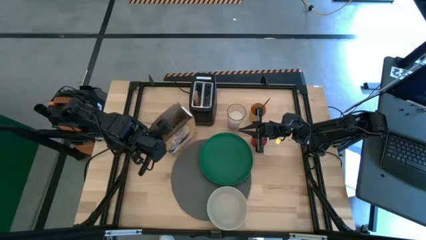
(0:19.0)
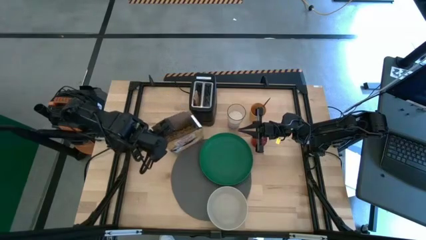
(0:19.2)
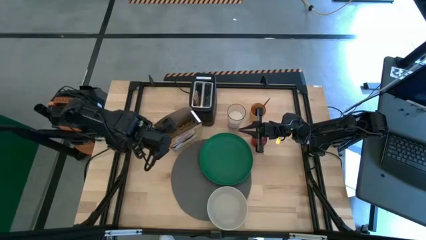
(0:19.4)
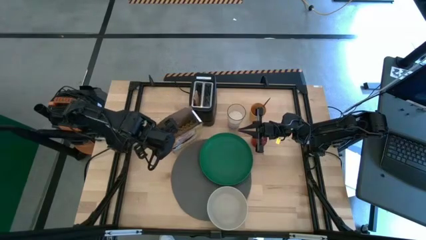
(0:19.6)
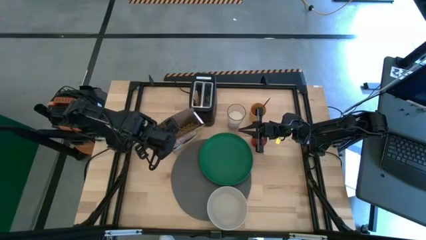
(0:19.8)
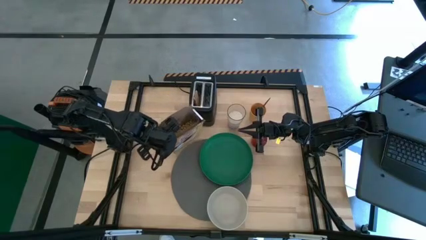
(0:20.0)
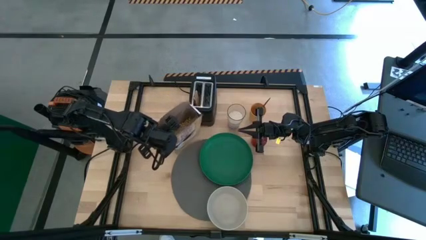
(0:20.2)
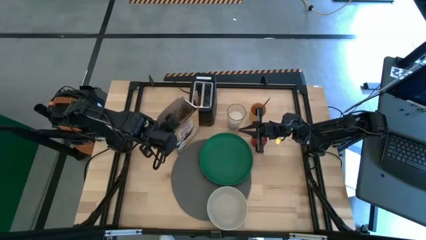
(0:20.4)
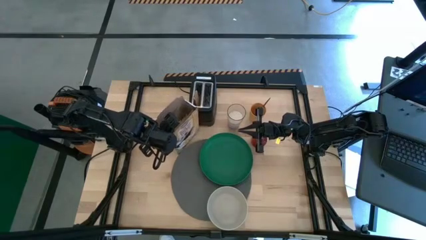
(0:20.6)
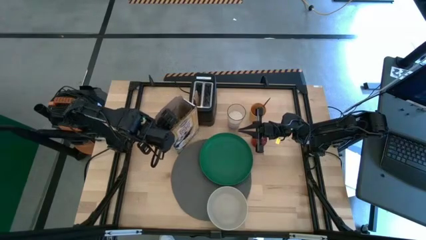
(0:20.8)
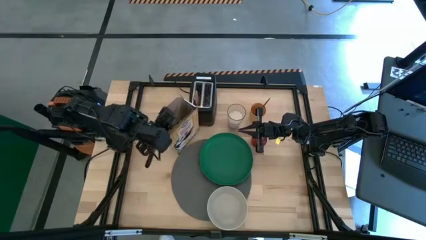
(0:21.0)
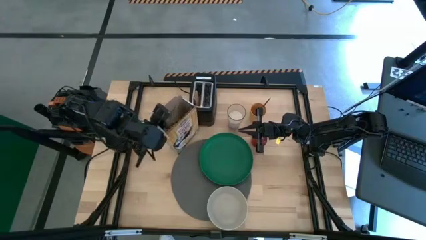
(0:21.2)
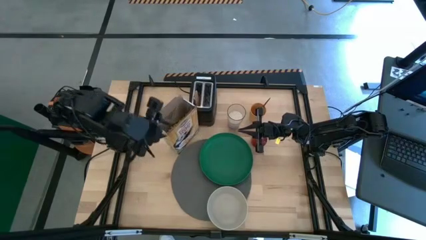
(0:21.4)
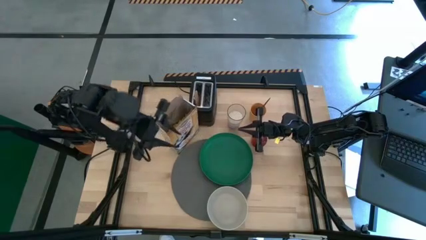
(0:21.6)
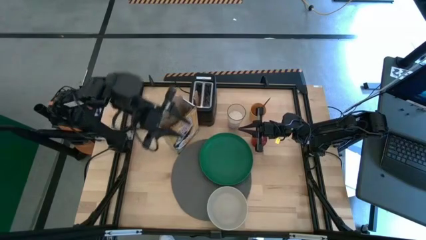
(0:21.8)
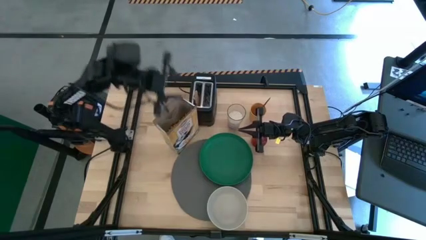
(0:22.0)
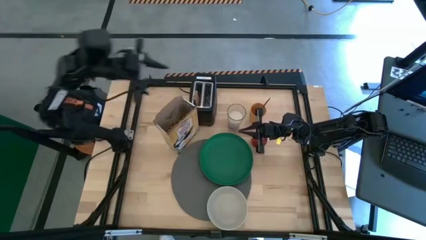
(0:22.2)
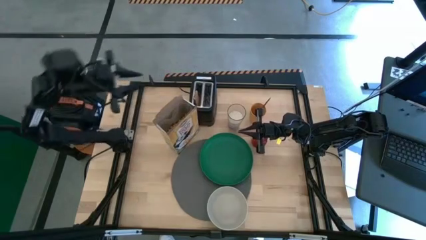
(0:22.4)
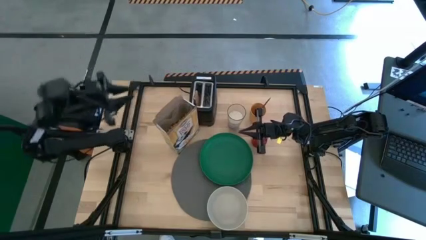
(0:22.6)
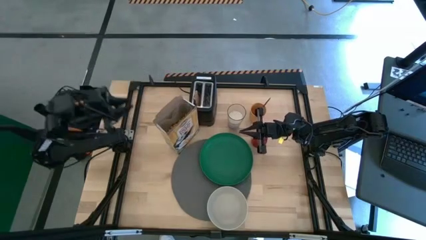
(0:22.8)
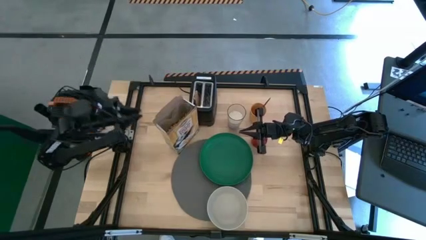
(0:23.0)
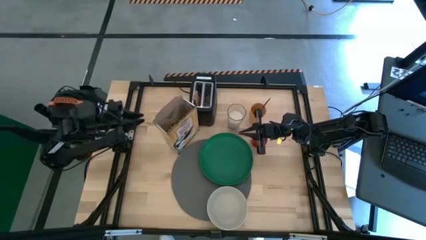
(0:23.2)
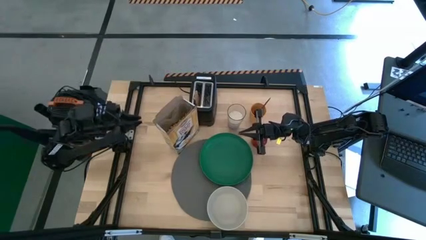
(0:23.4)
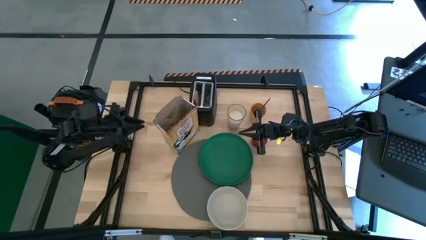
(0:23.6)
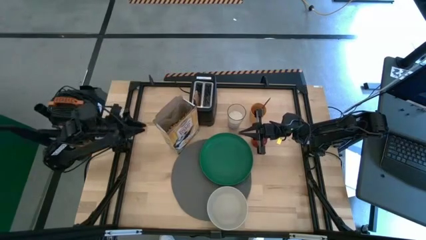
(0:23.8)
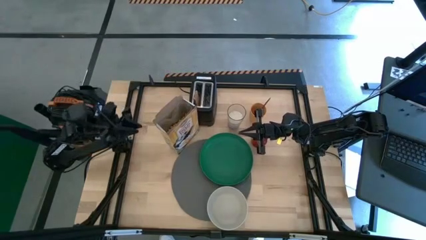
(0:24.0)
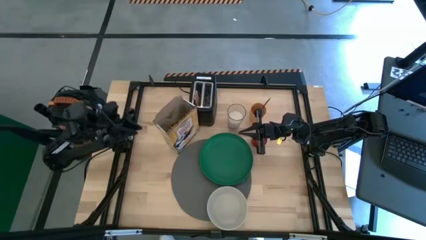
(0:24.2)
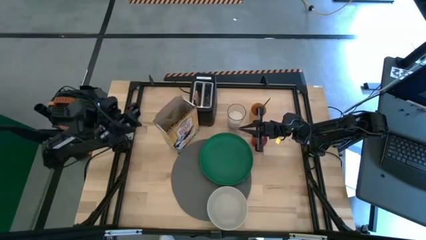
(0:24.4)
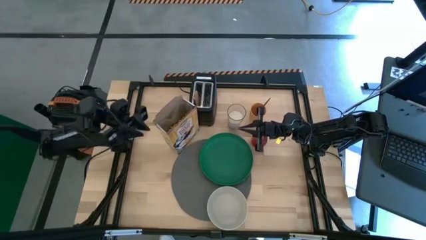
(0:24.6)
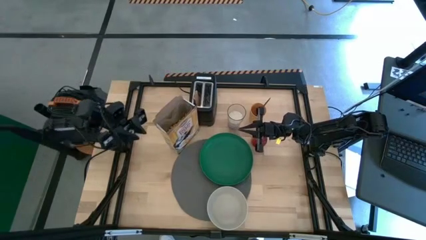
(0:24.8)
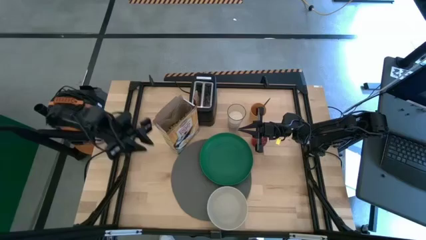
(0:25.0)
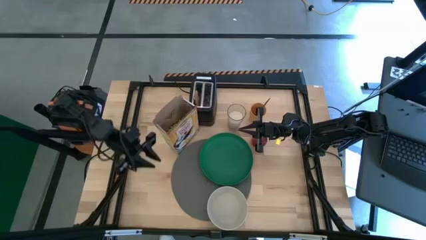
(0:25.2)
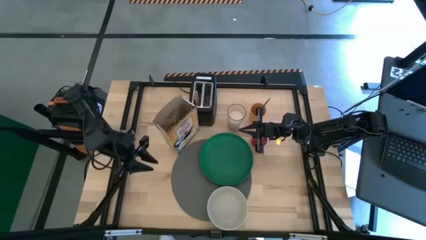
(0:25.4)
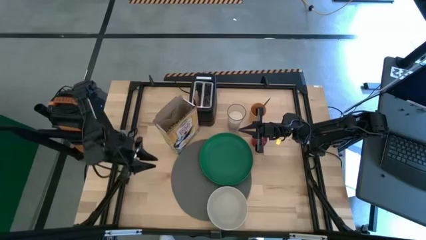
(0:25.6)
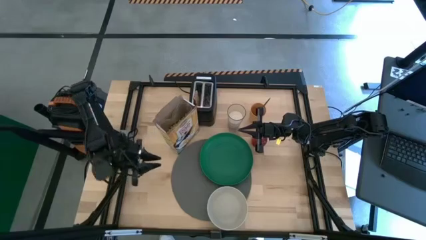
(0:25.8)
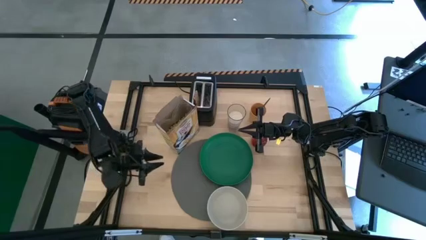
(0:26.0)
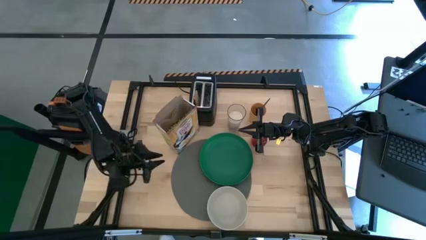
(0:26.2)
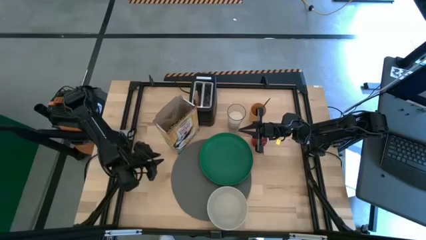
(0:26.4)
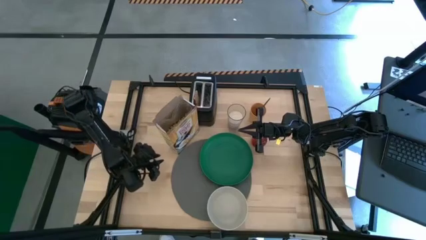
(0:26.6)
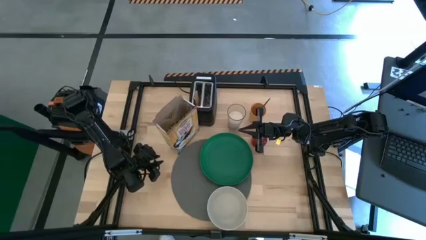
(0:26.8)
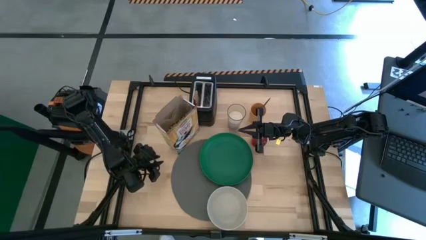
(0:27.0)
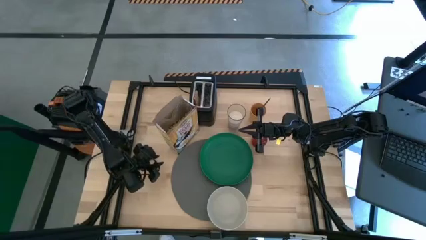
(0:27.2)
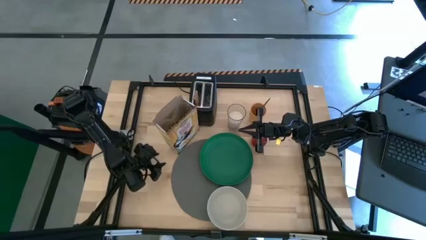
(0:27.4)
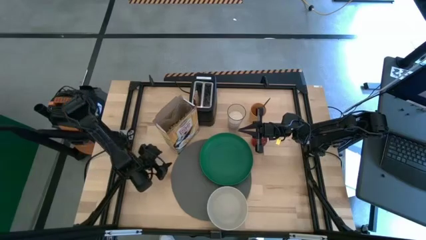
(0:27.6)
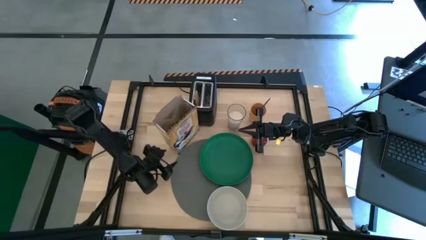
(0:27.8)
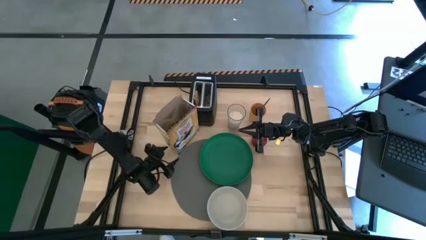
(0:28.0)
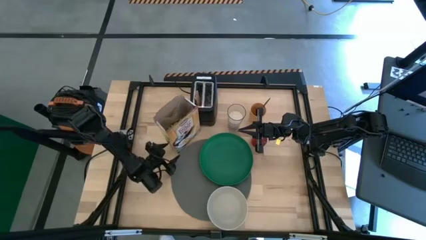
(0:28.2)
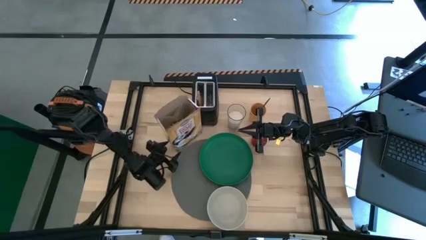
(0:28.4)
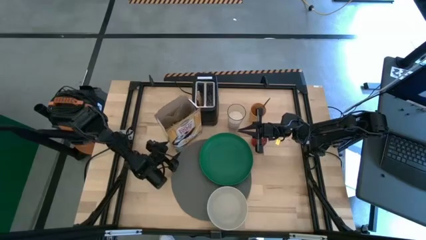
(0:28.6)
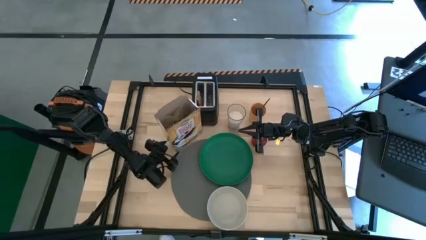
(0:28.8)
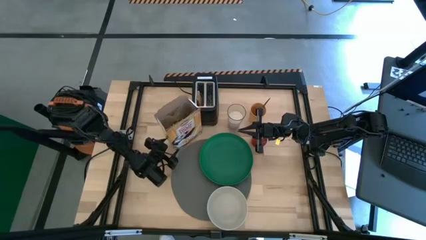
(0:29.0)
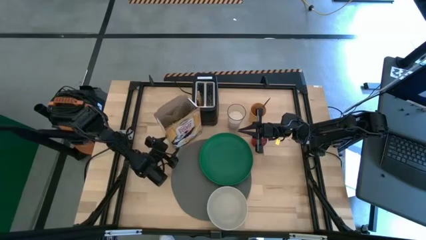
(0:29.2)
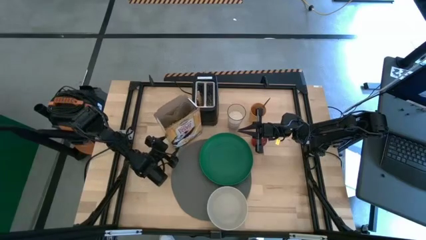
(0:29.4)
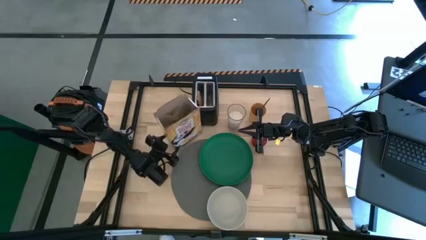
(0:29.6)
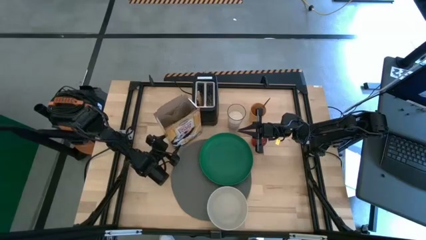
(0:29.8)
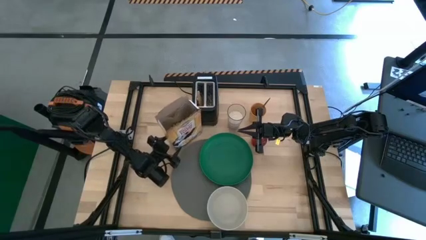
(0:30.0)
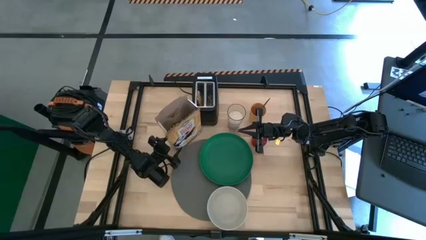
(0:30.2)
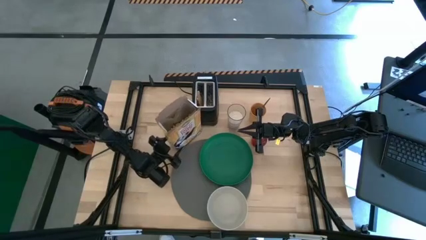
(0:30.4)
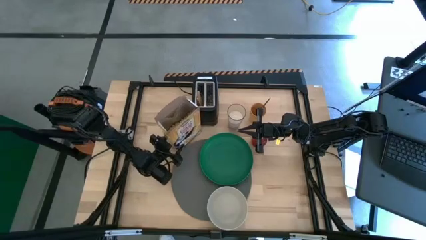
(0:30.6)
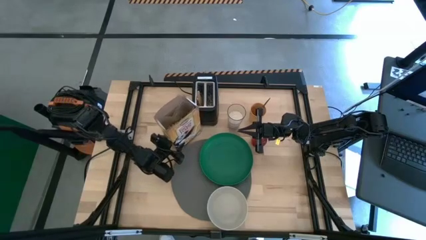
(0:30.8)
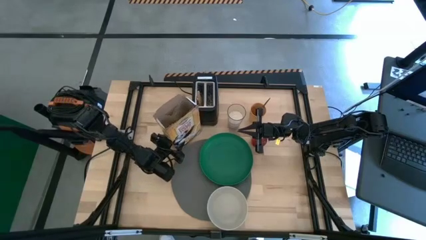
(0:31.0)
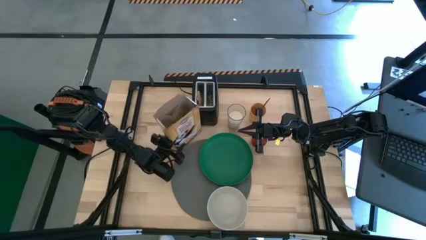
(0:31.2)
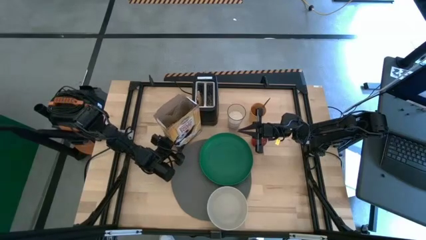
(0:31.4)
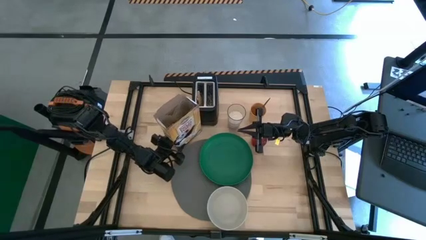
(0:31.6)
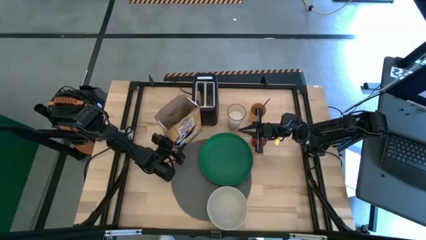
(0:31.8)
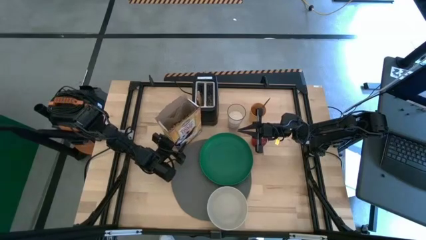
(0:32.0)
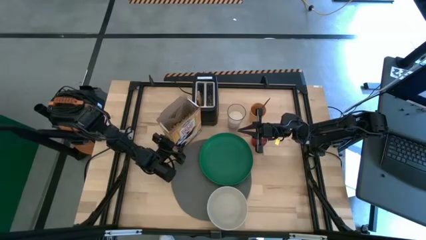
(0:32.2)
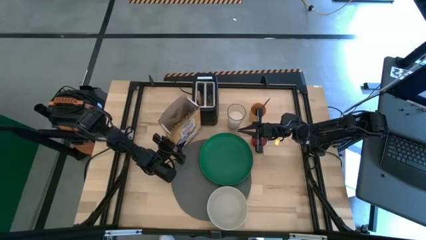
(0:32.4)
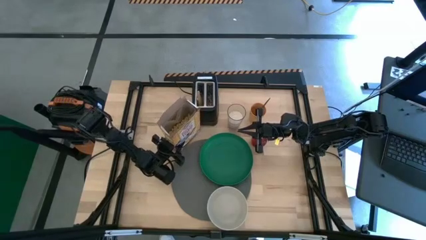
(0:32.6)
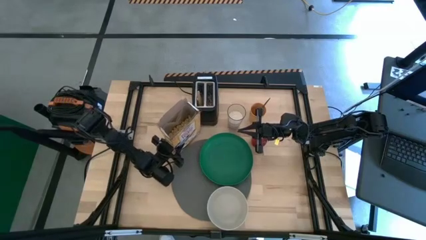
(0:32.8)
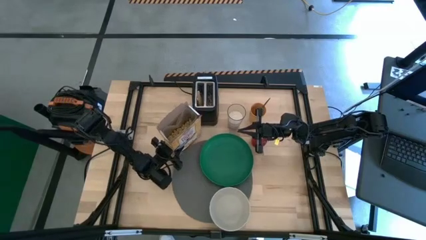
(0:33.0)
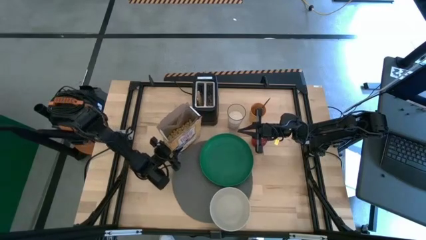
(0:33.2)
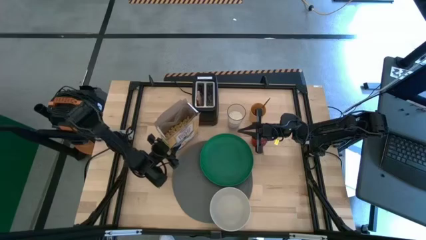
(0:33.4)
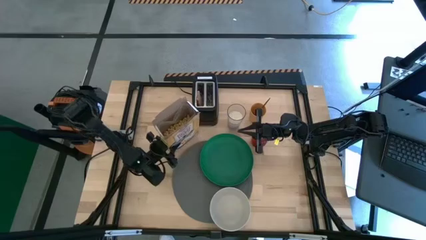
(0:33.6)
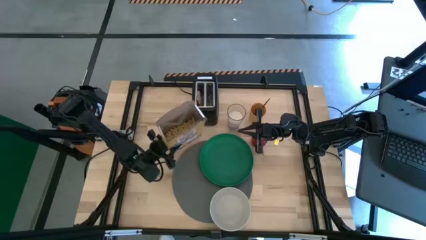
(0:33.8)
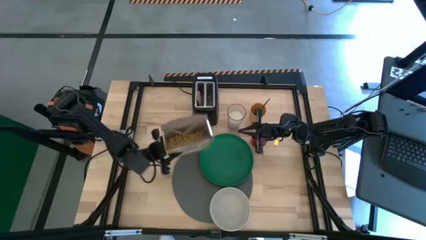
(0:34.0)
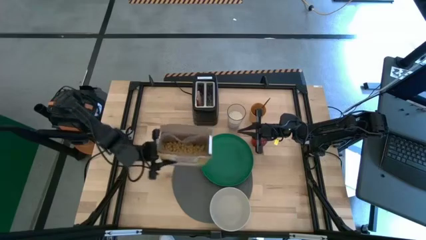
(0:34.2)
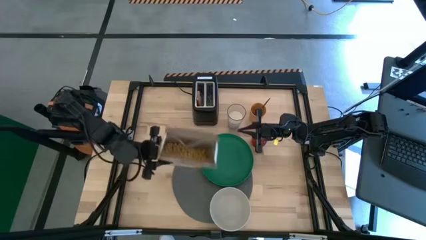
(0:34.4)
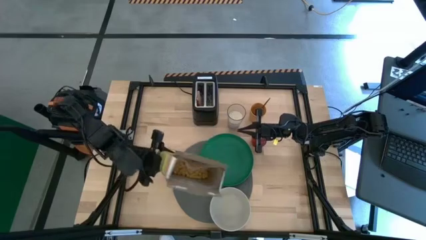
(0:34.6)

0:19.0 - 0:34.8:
Task: Arrange a breakfast setting
Pour the cereal into the white bowl
